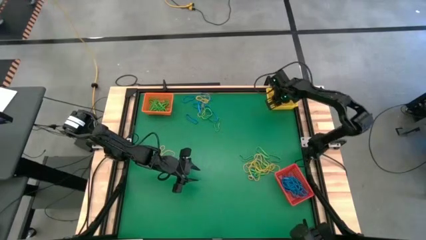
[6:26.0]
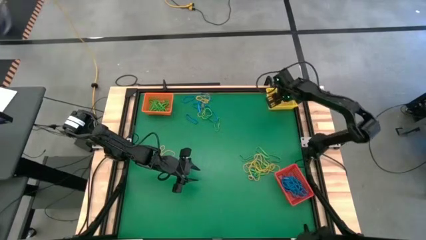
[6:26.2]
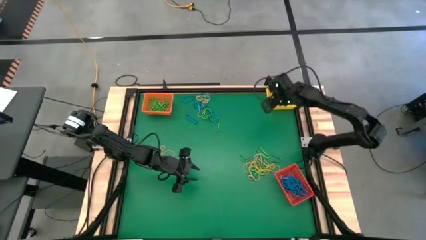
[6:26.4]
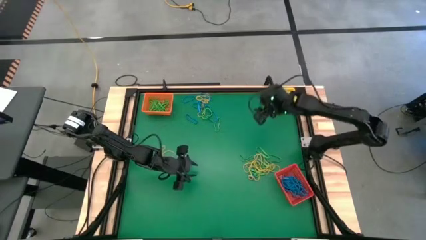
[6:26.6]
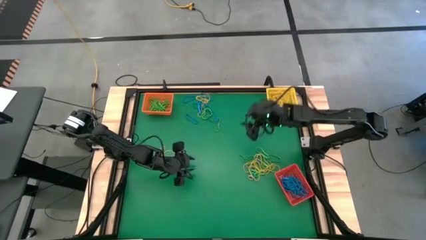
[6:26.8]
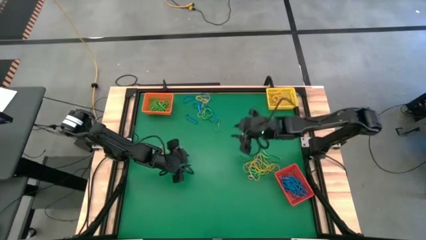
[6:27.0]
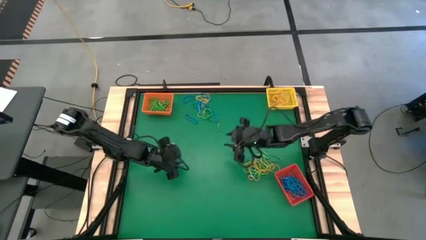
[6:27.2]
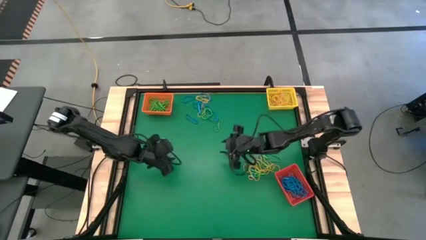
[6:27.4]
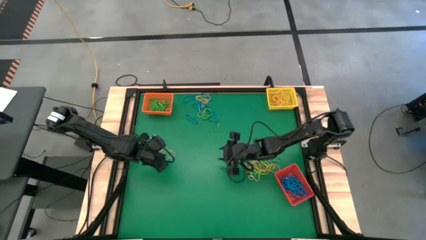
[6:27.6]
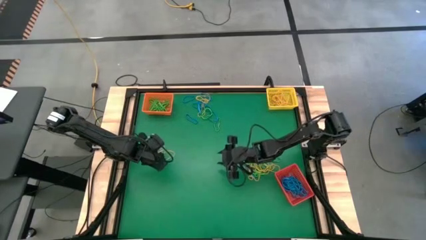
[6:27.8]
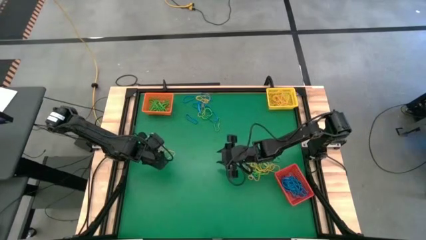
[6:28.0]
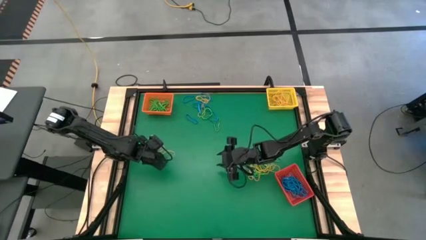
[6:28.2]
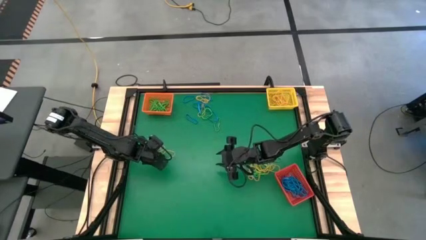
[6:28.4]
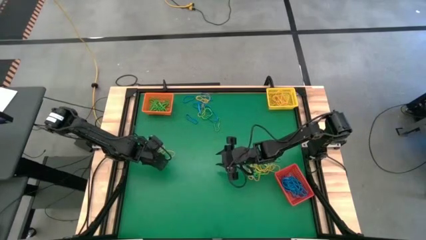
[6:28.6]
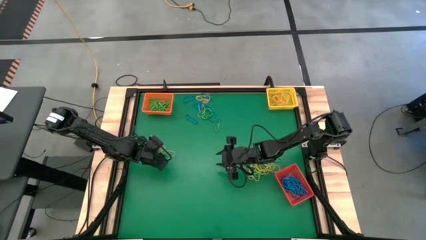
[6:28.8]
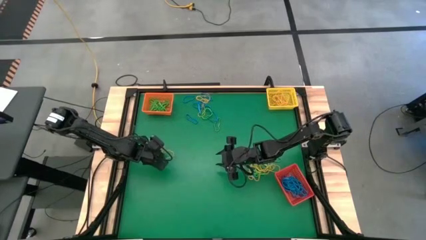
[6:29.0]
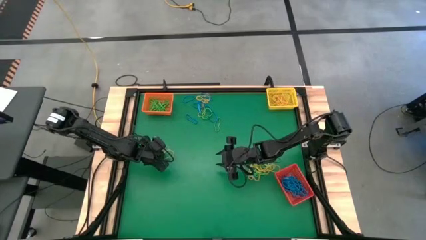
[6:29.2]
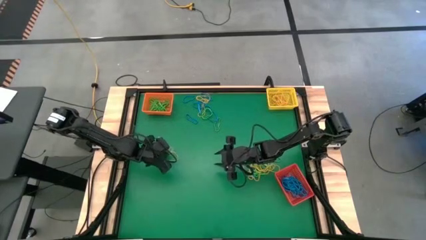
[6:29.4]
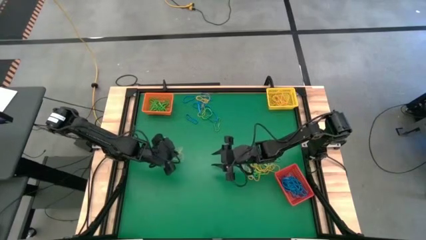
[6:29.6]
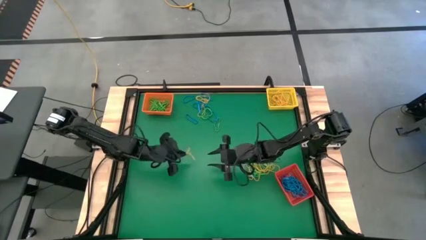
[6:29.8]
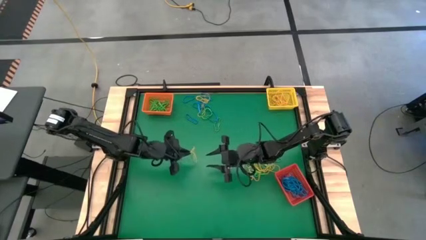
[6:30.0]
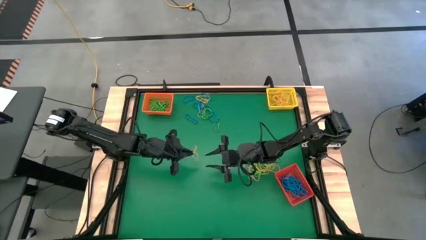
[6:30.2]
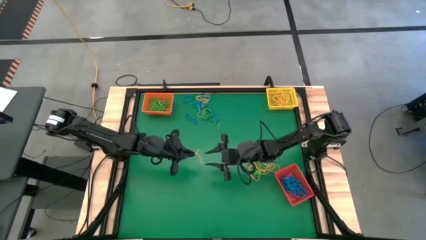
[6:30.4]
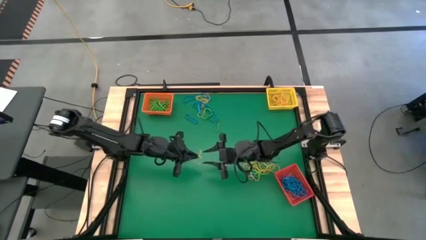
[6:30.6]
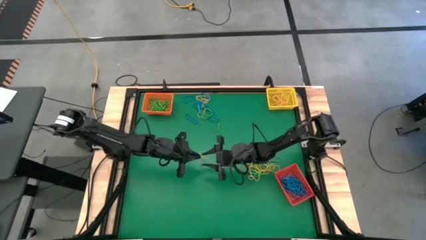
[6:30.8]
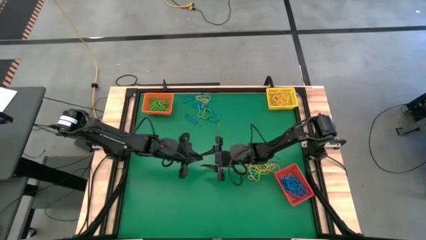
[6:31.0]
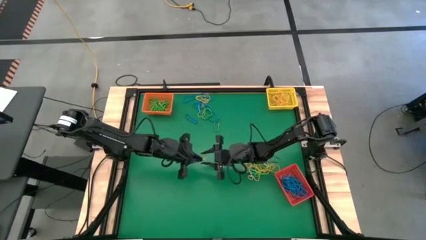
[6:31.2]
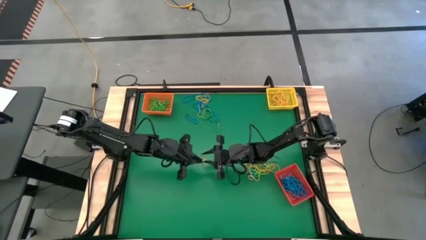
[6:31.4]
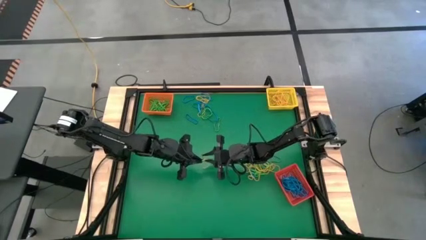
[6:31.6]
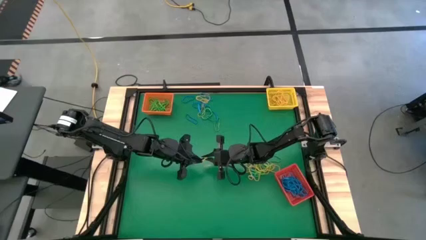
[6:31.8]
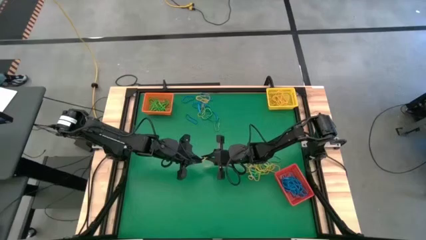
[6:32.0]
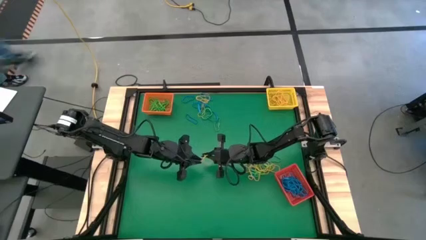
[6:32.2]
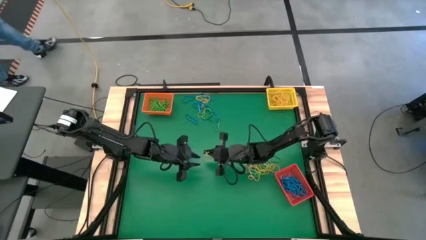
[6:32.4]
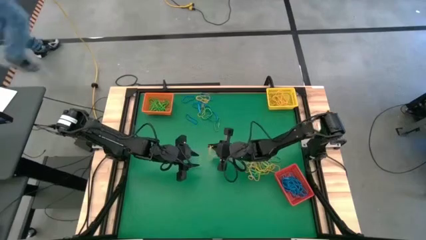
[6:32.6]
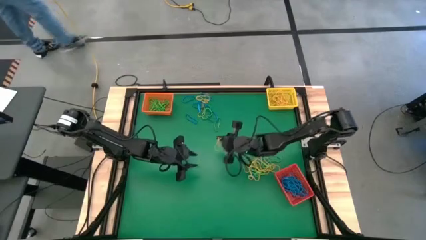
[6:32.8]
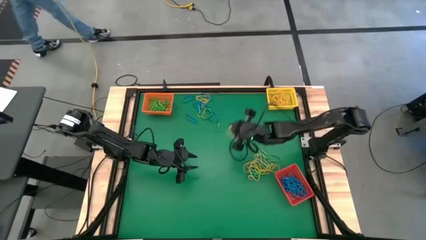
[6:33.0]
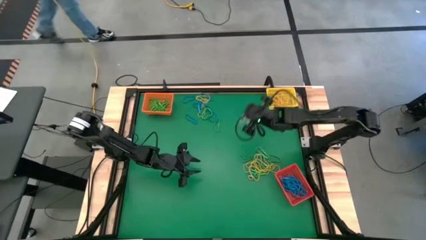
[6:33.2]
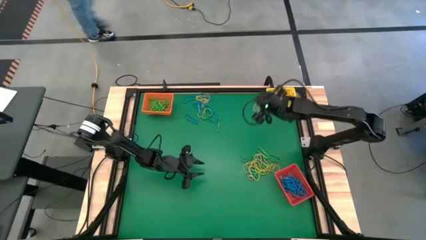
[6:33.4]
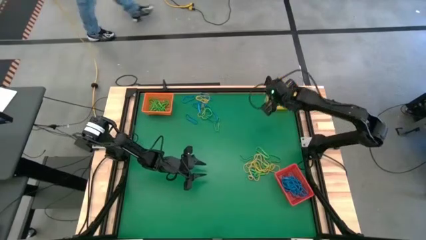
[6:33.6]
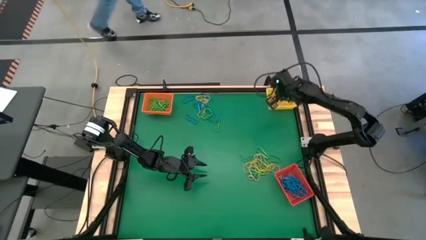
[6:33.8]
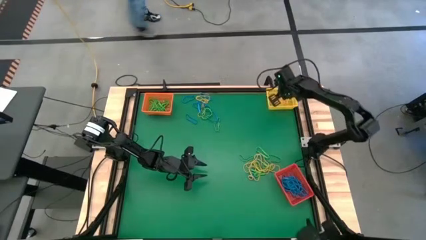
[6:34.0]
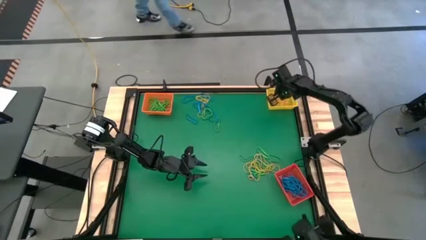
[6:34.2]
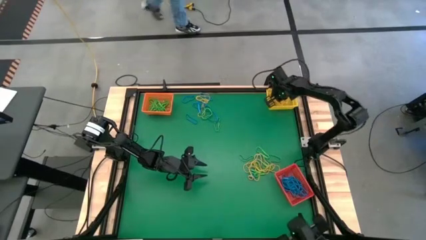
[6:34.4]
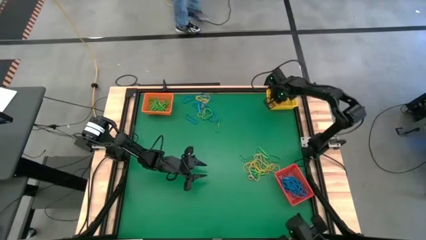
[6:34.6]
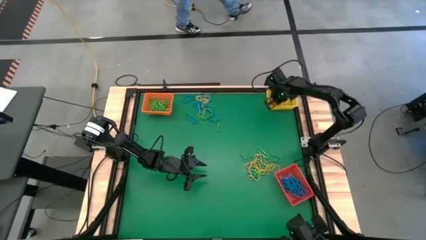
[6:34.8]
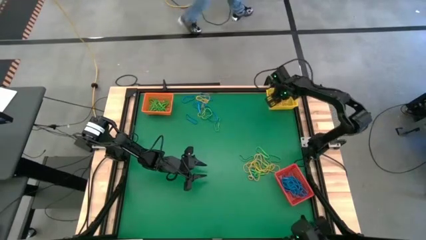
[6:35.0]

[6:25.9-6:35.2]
Task: Sort rubber bands into baskets
Put the yellow rubber band into the yellow bin

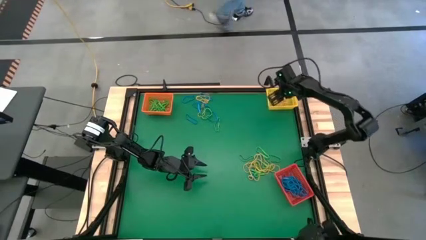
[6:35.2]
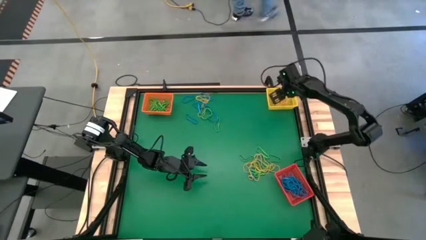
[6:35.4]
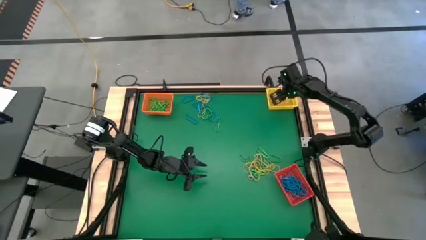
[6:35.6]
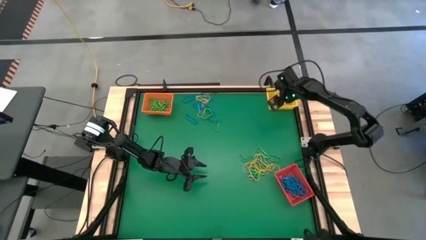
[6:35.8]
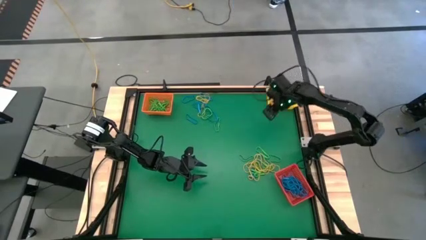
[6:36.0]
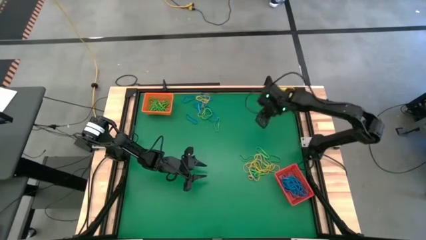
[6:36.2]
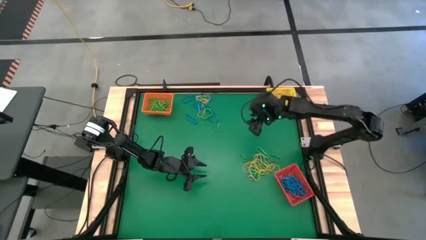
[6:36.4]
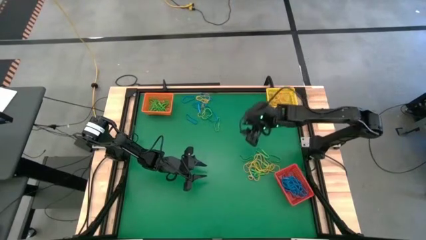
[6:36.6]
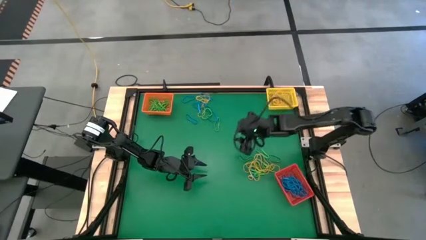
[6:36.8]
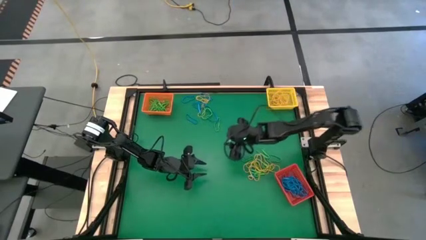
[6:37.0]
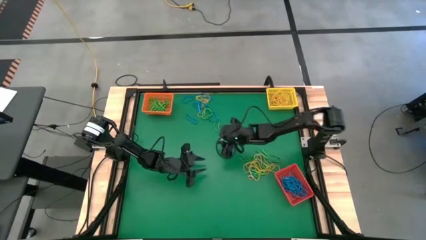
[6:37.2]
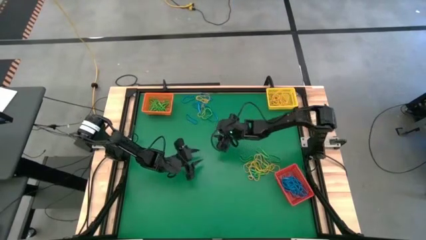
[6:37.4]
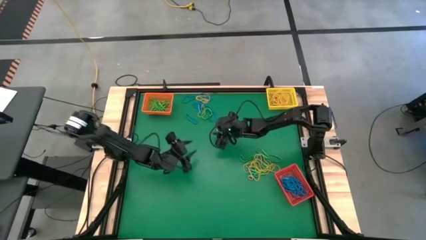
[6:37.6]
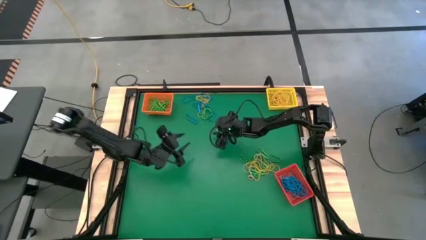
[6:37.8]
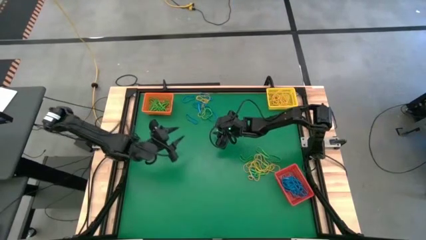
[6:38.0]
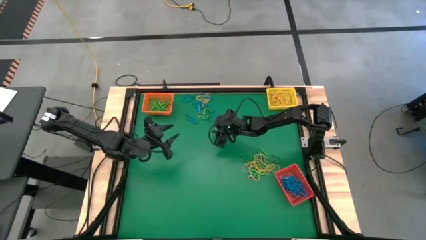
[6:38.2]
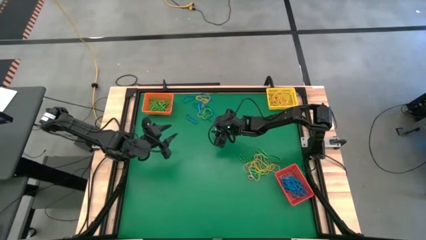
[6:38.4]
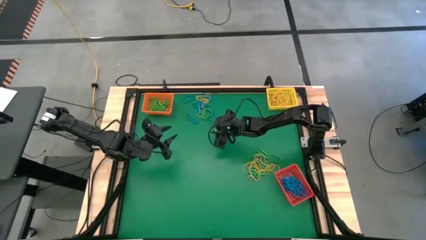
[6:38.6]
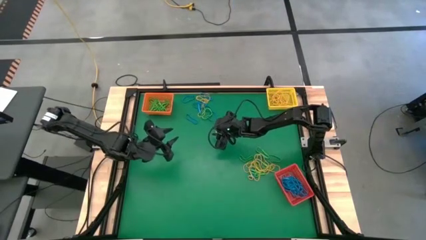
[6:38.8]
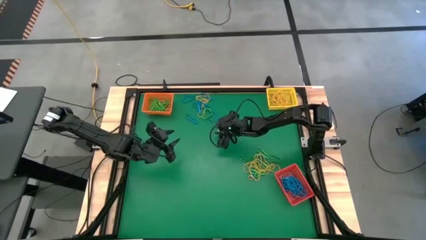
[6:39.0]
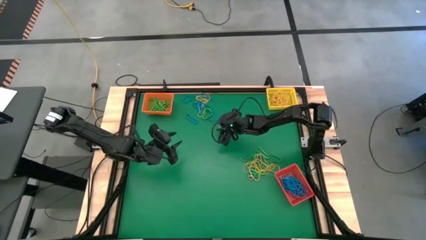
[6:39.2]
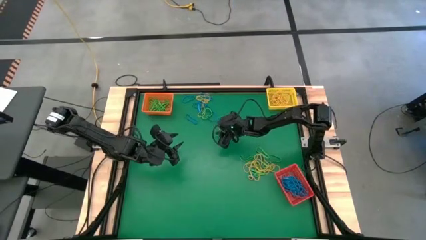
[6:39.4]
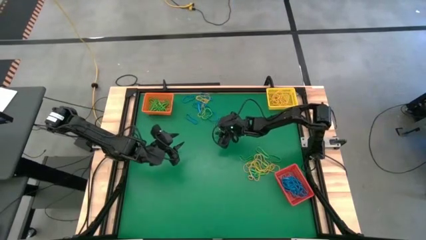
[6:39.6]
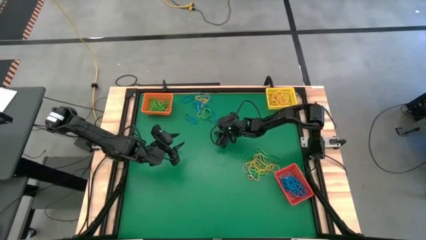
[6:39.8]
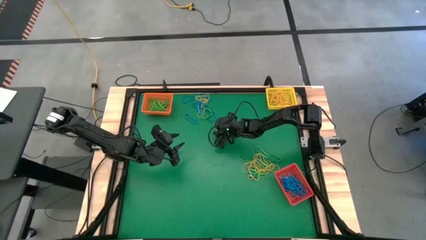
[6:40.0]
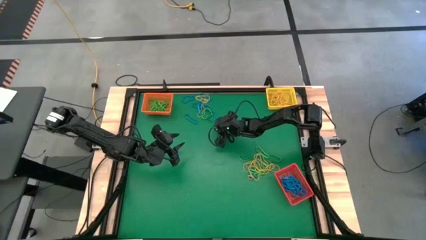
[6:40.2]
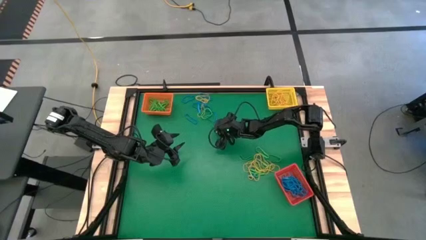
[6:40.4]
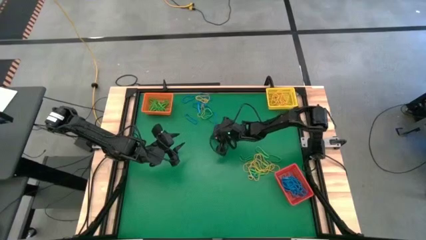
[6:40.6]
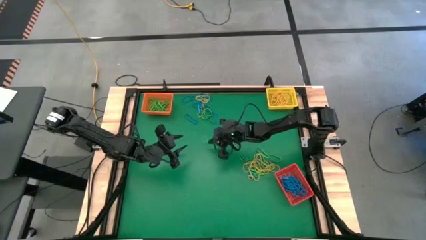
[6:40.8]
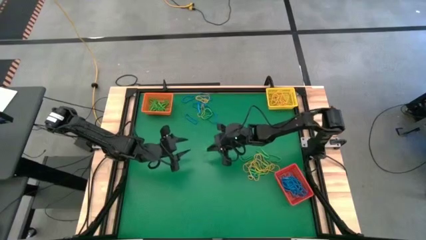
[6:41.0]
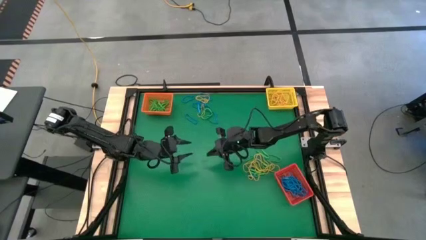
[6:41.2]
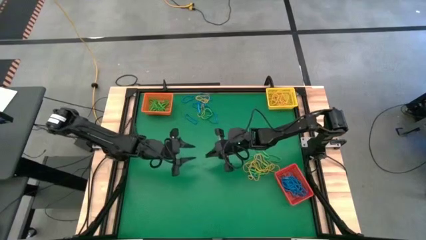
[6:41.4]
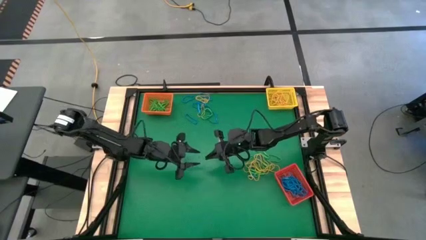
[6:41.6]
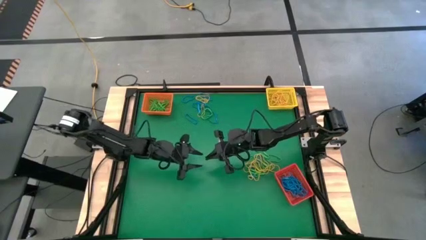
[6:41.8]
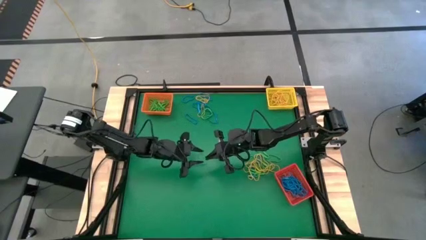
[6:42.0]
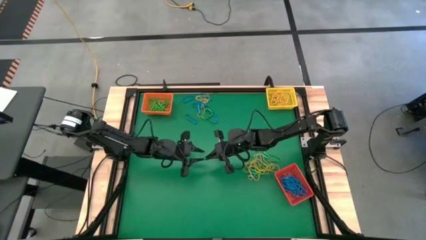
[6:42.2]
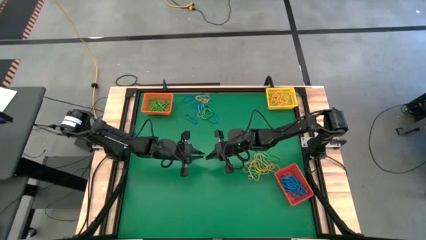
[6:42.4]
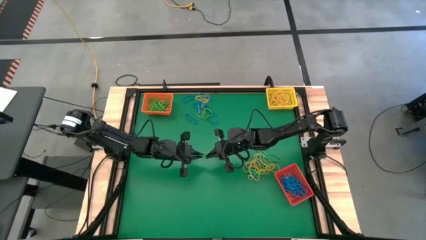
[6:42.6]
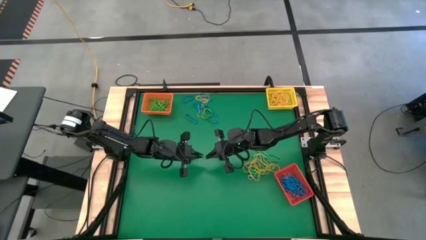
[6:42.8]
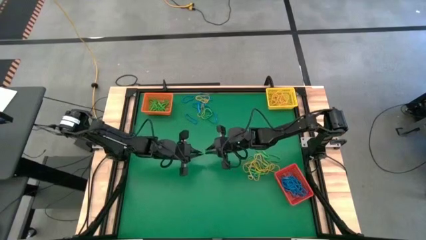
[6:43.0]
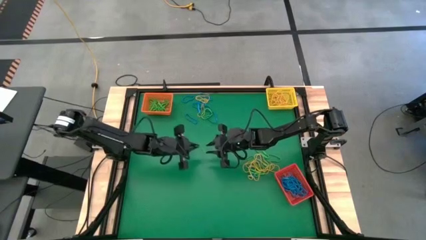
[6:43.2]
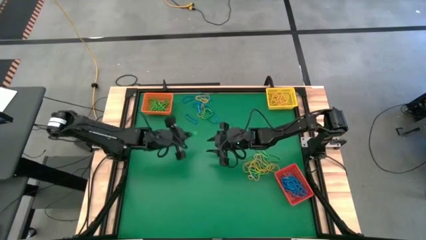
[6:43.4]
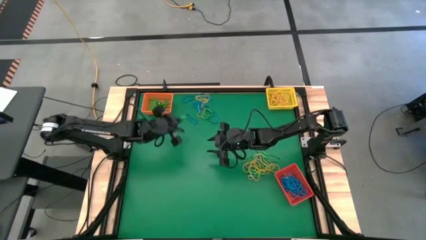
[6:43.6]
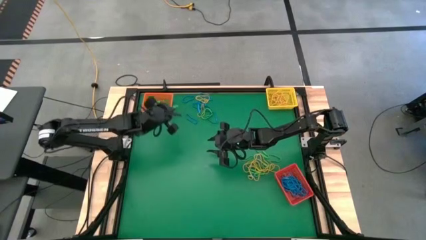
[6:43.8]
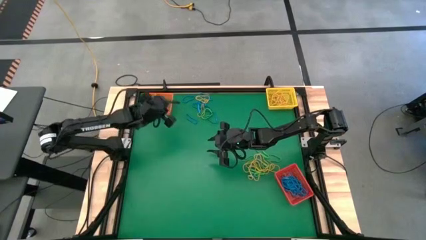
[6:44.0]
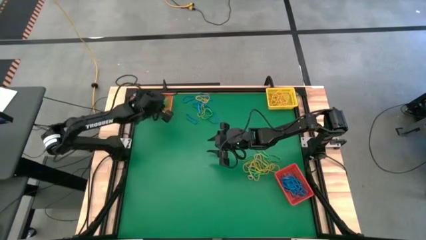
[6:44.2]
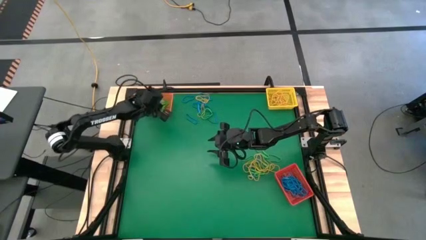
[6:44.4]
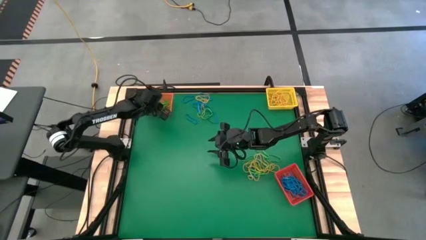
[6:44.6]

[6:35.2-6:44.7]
Put the green rubber band into the orange bin
